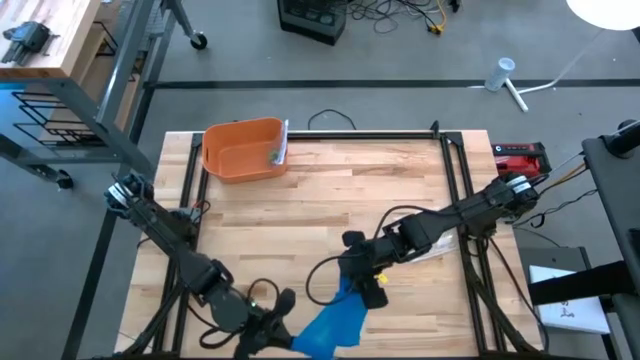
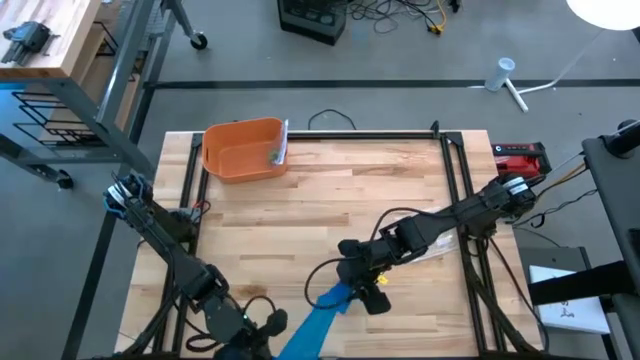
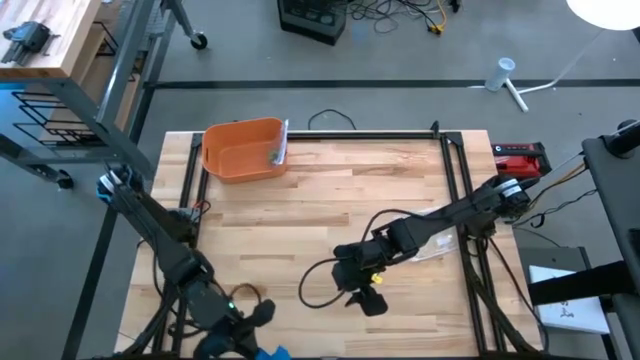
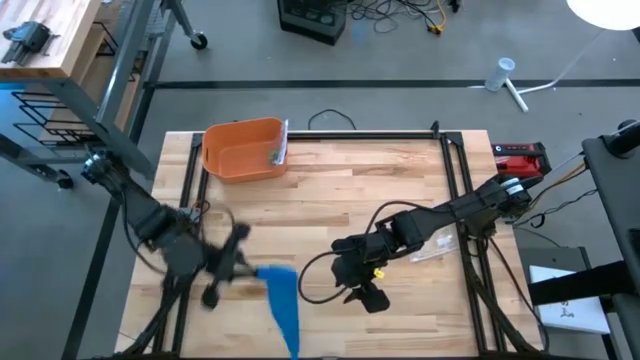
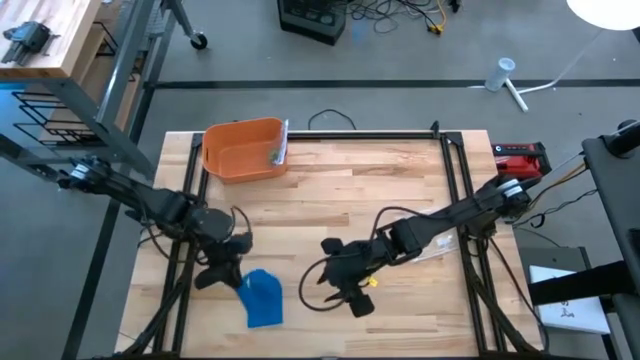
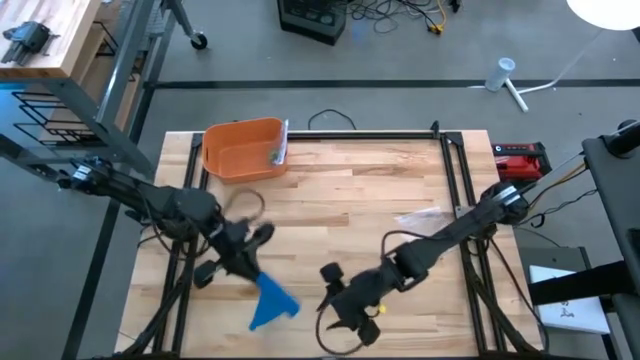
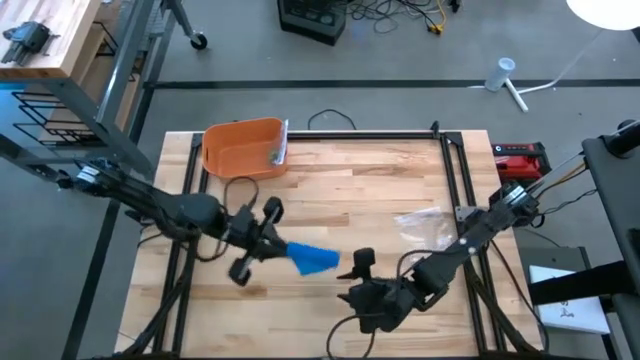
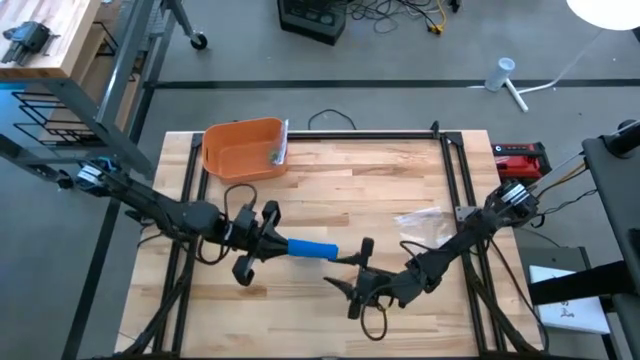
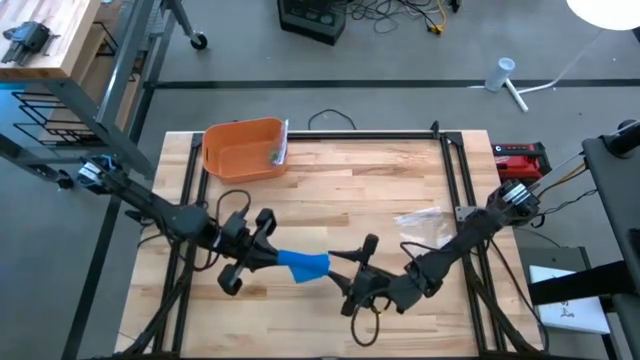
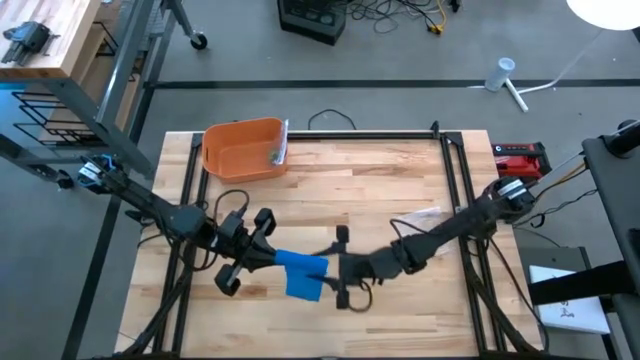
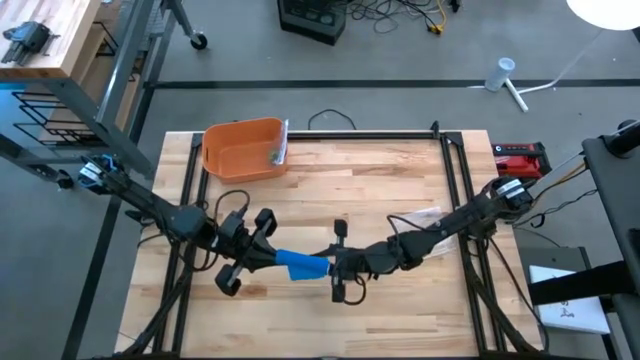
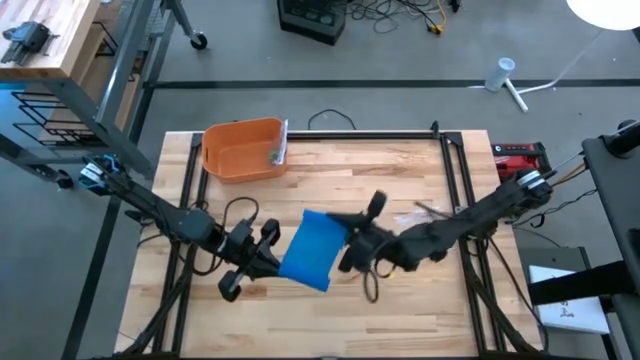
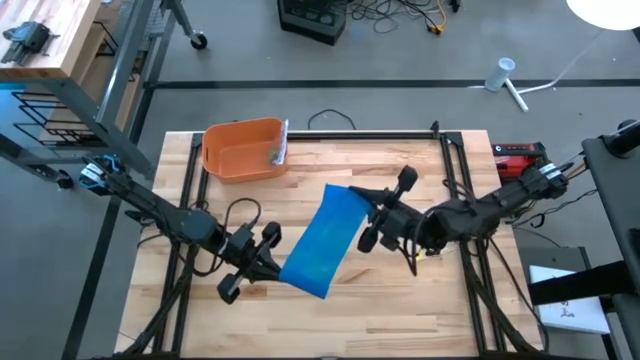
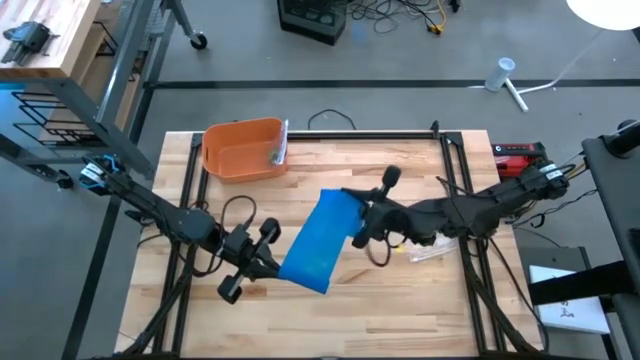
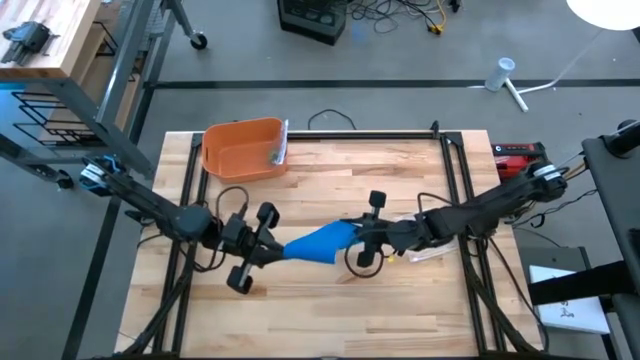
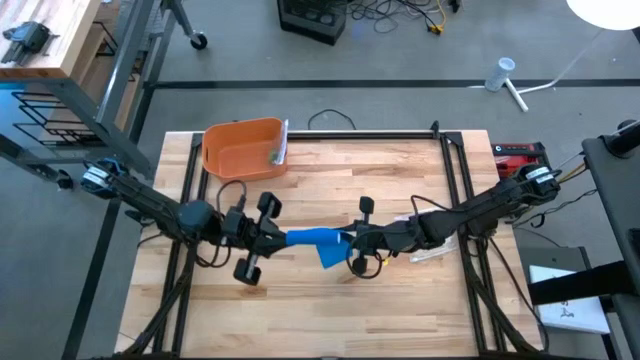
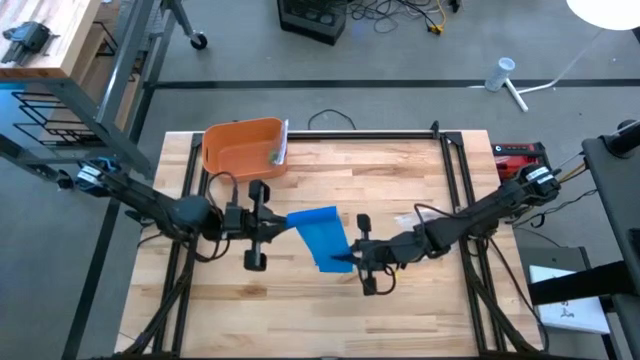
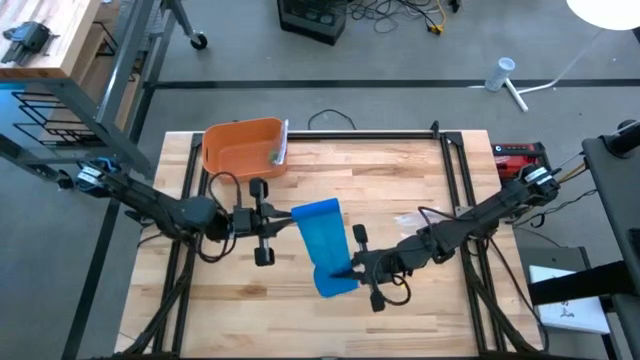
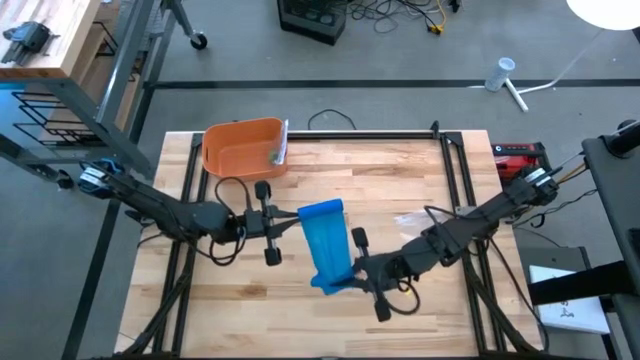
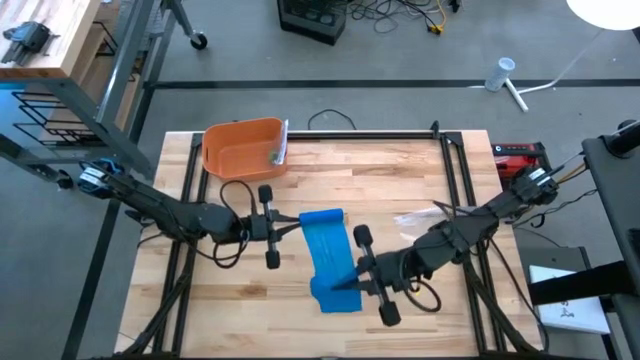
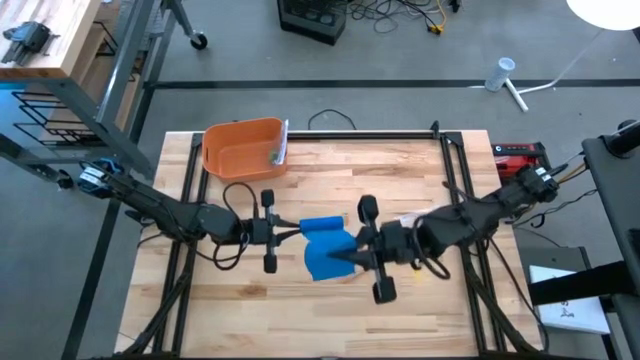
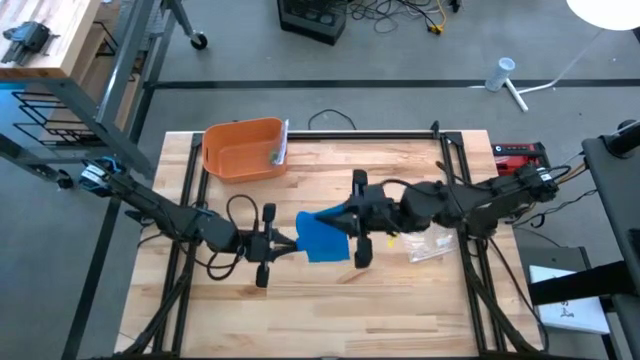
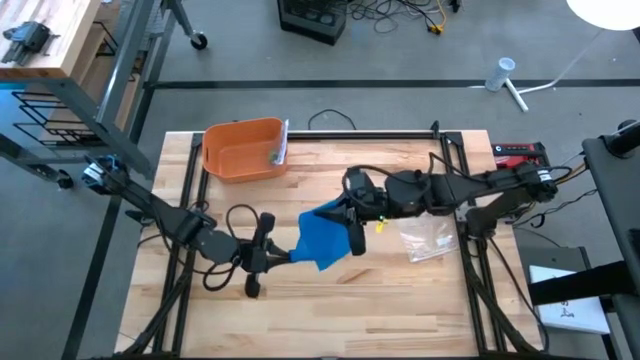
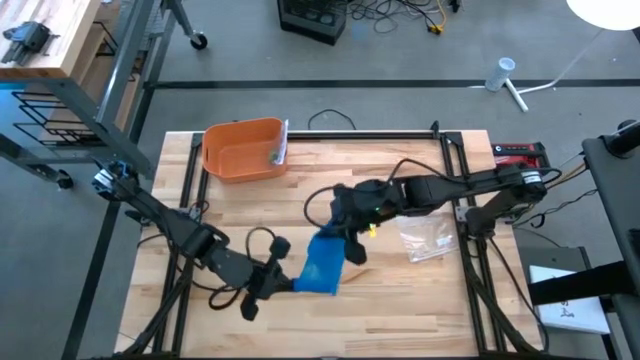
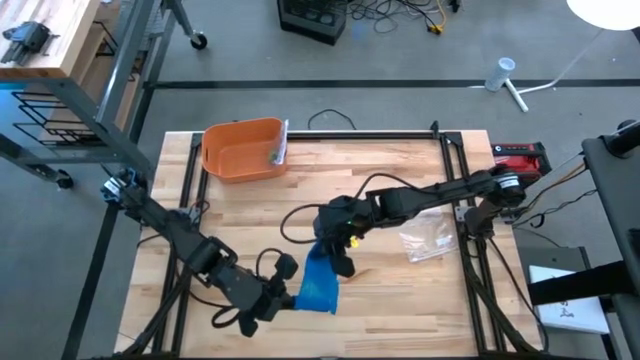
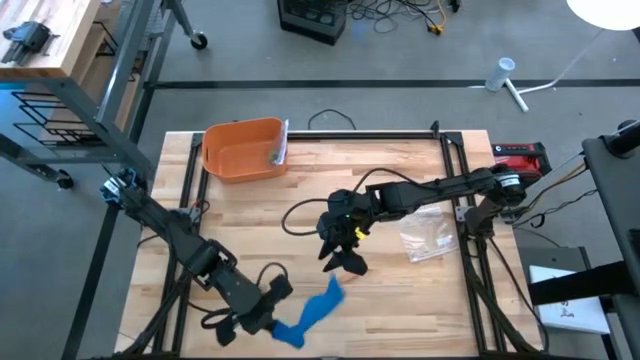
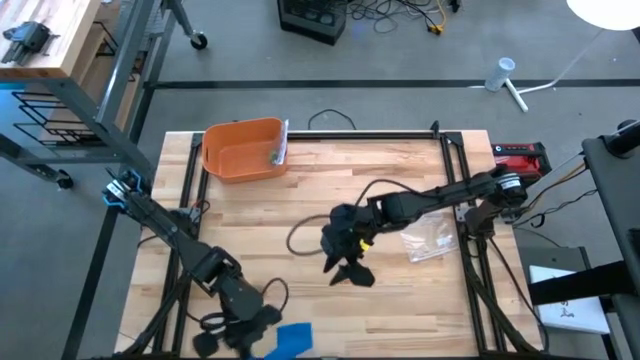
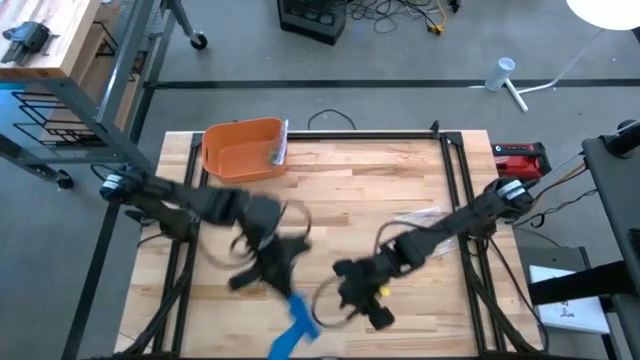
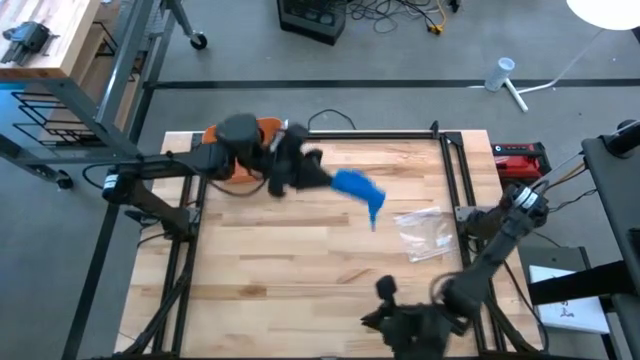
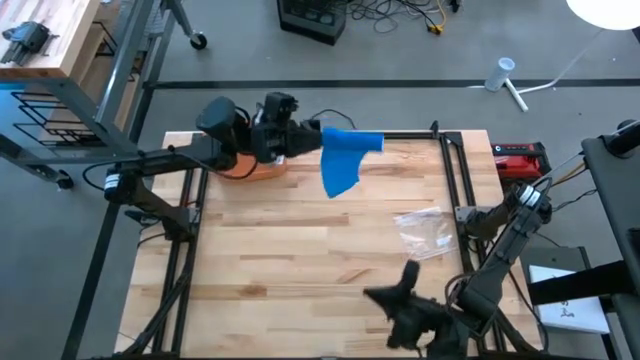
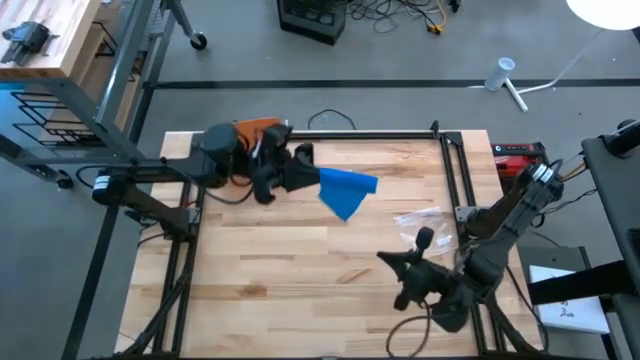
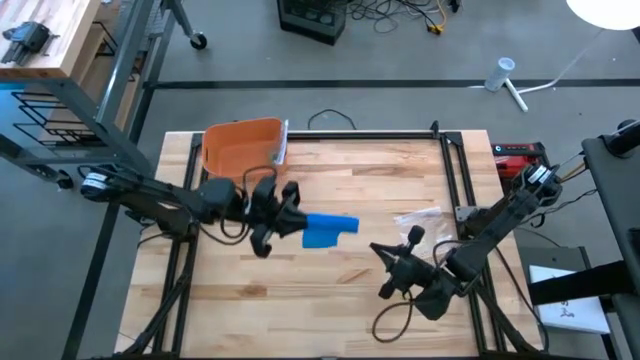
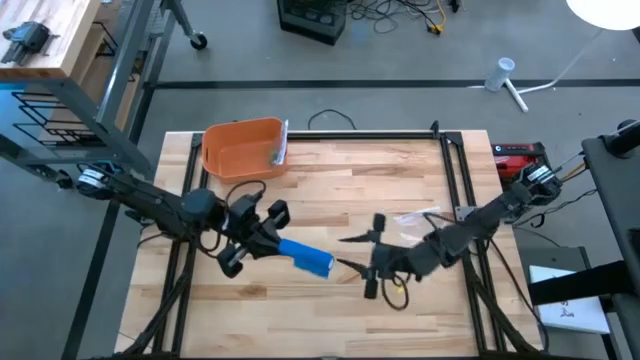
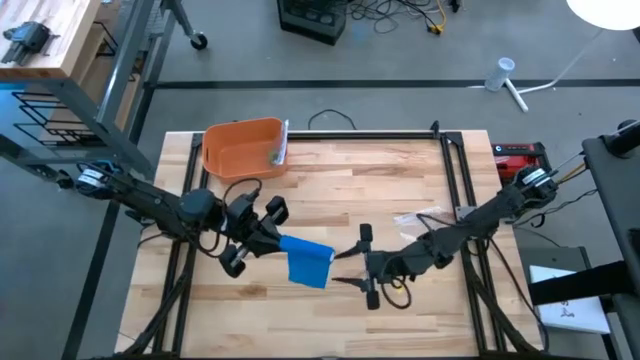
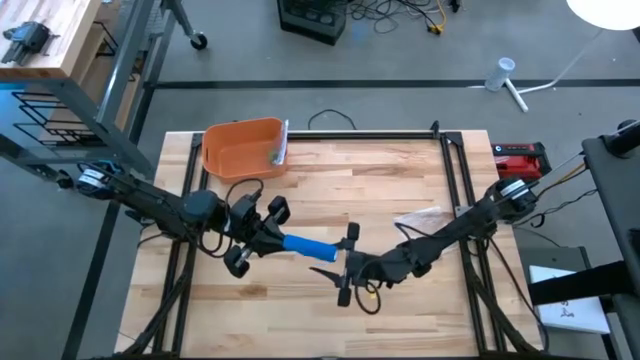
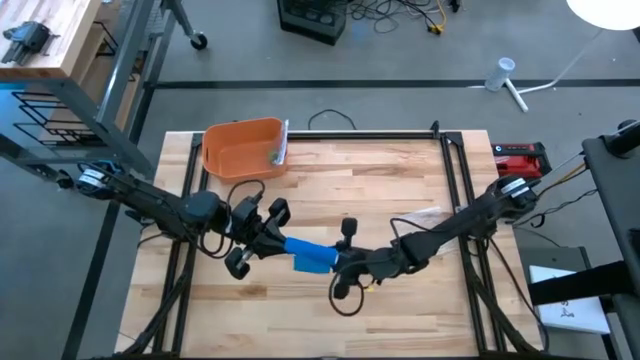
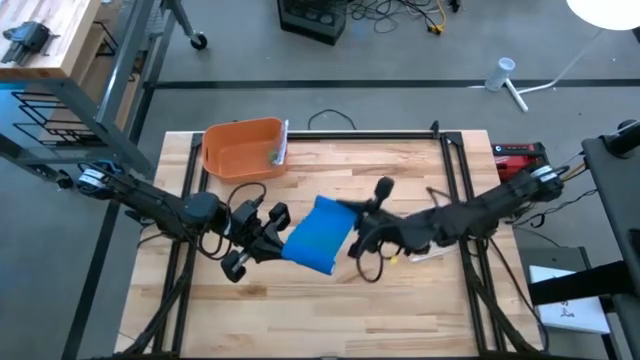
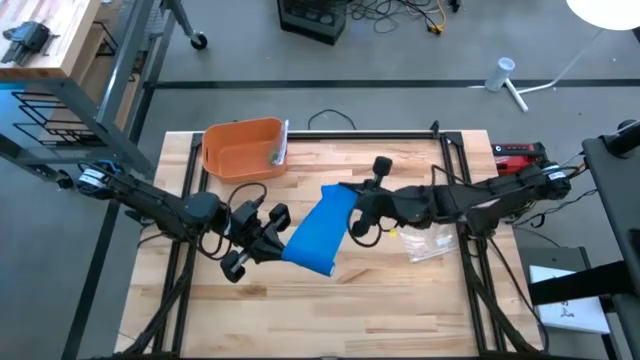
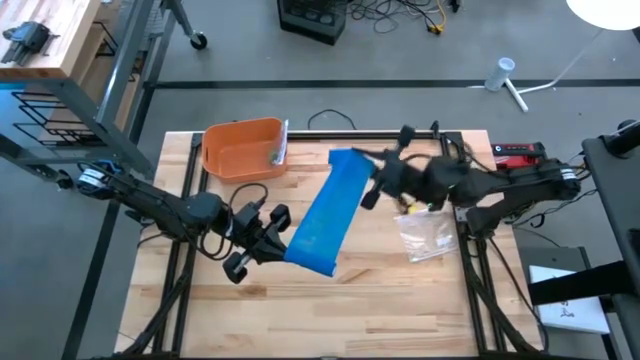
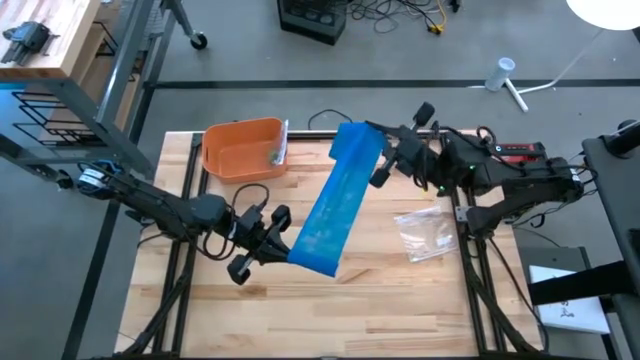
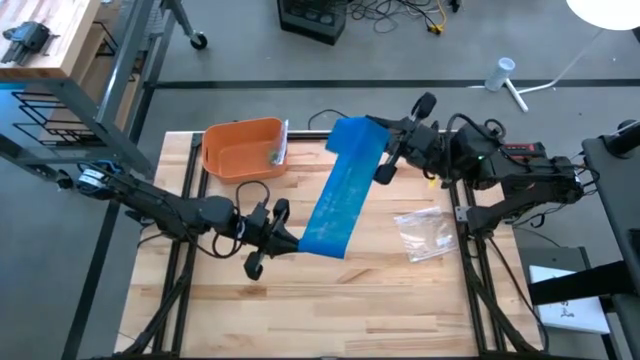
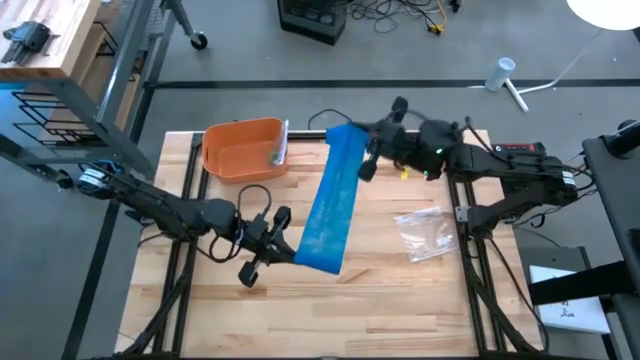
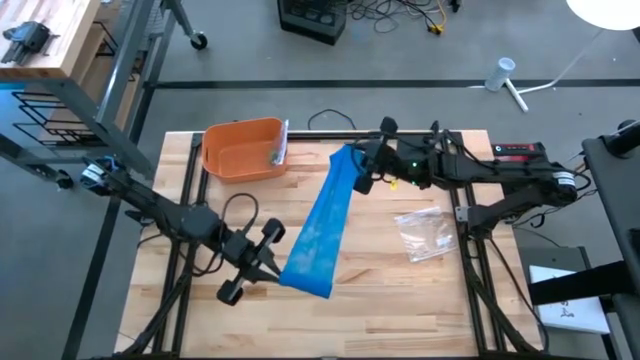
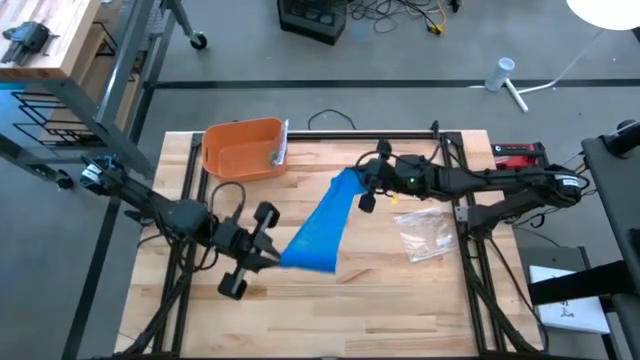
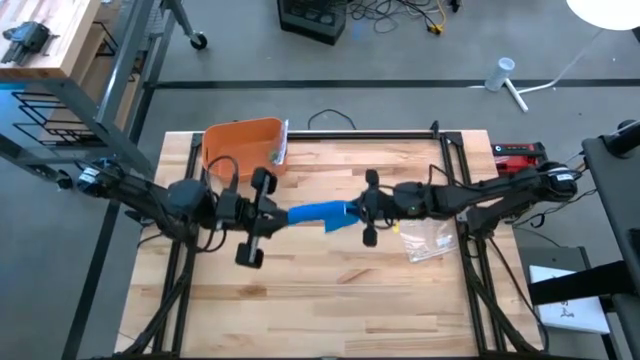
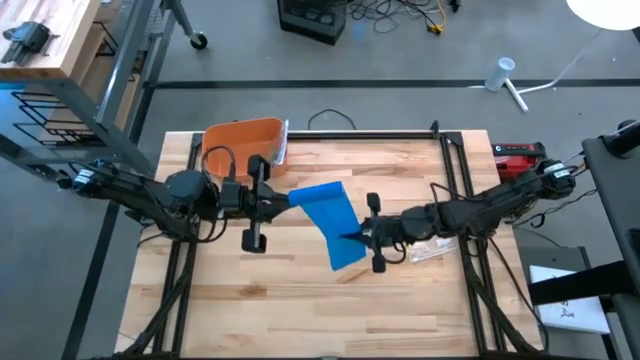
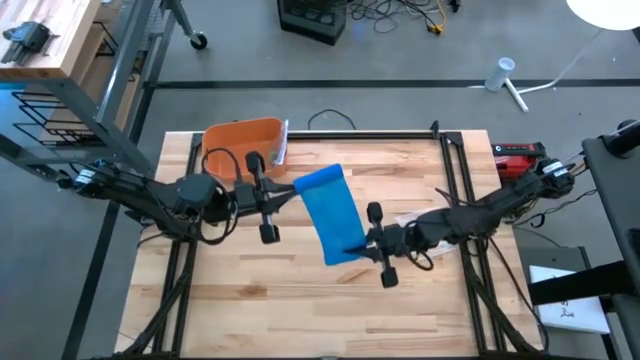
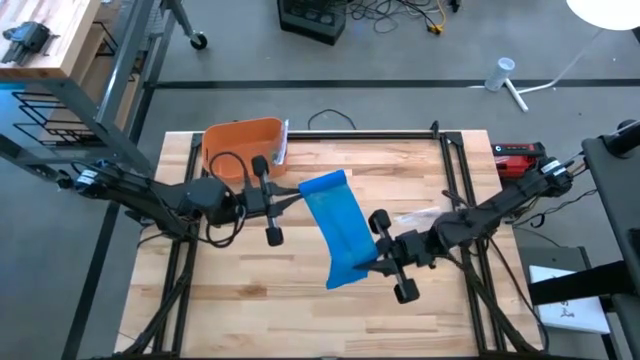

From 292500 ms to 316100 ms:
Task: Roll bandage
Roll the blue bandage
